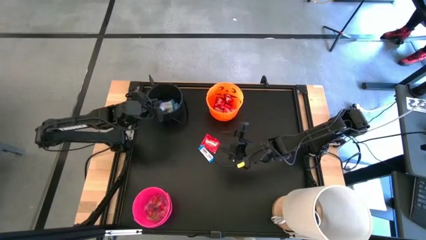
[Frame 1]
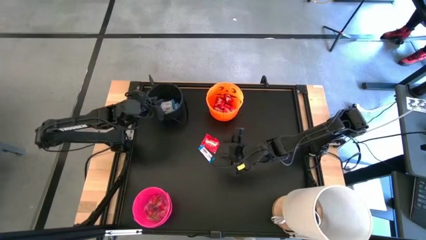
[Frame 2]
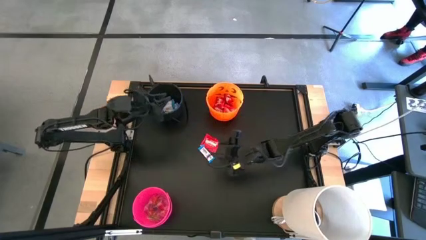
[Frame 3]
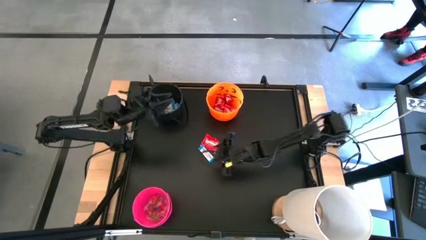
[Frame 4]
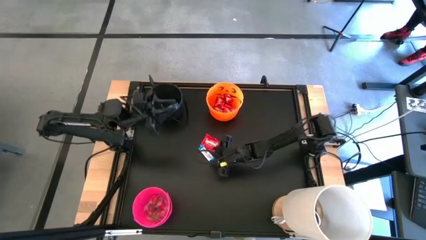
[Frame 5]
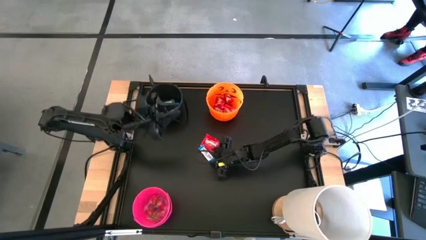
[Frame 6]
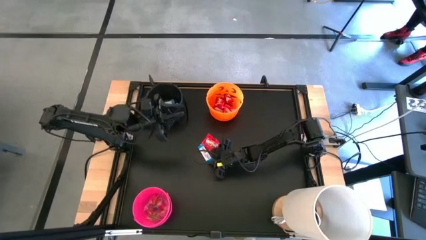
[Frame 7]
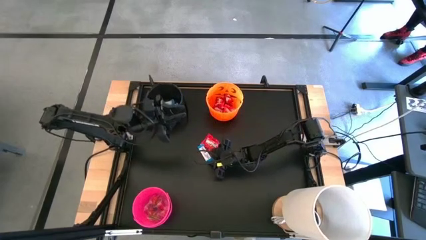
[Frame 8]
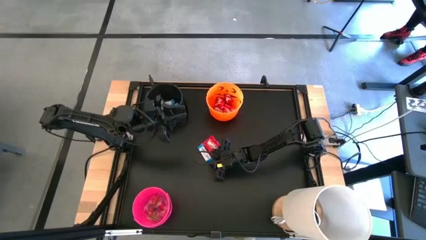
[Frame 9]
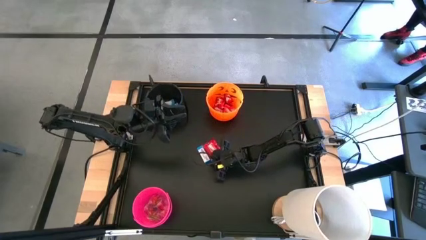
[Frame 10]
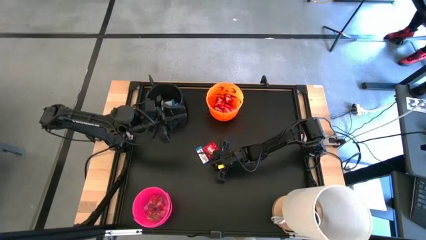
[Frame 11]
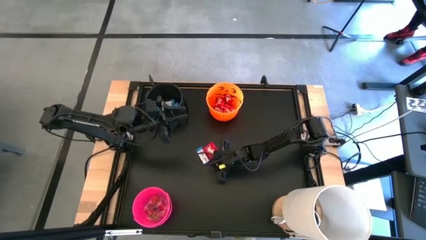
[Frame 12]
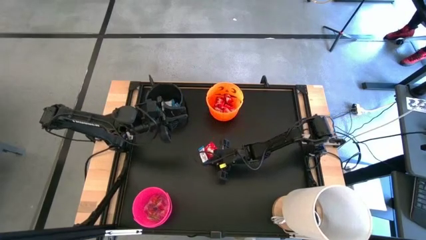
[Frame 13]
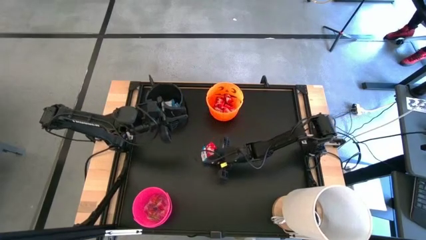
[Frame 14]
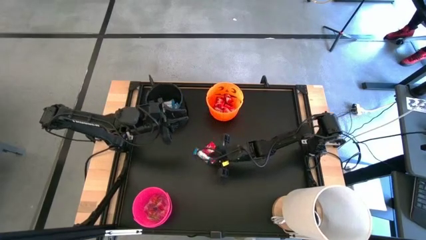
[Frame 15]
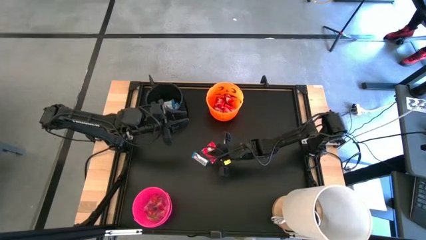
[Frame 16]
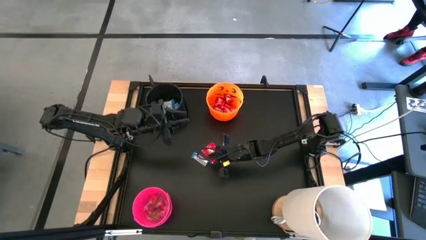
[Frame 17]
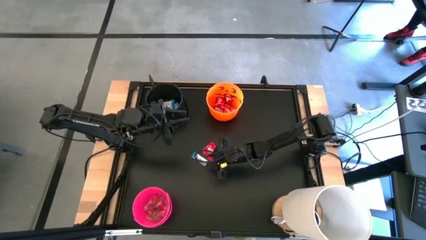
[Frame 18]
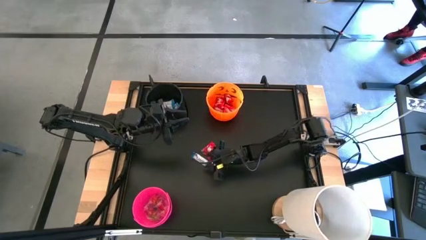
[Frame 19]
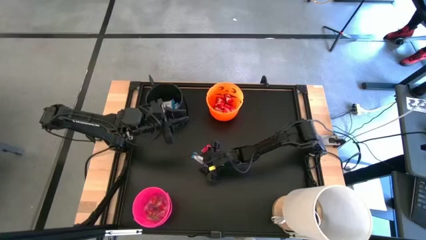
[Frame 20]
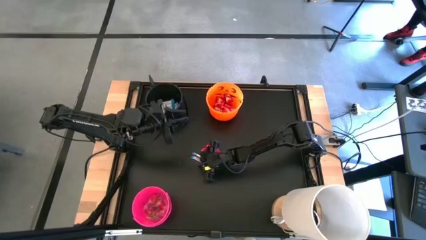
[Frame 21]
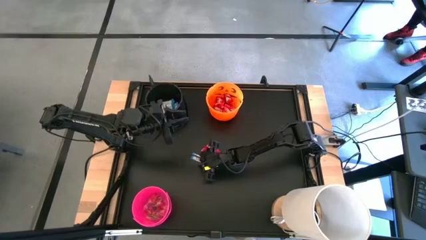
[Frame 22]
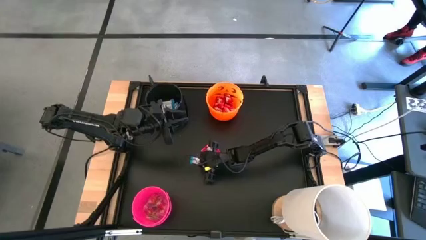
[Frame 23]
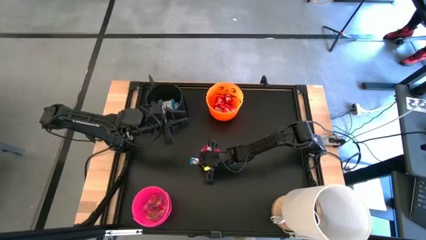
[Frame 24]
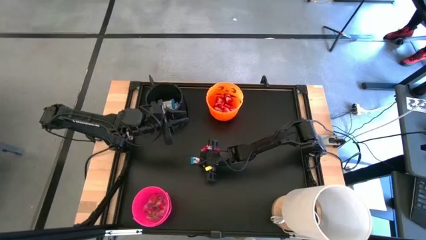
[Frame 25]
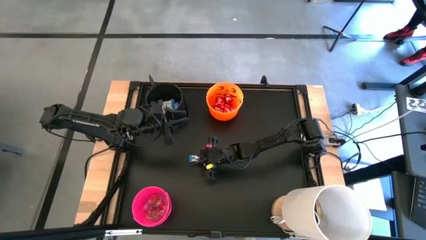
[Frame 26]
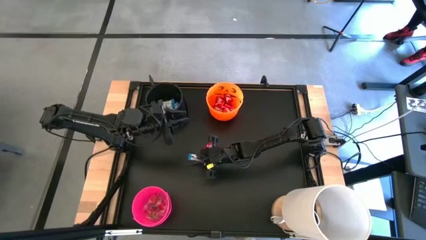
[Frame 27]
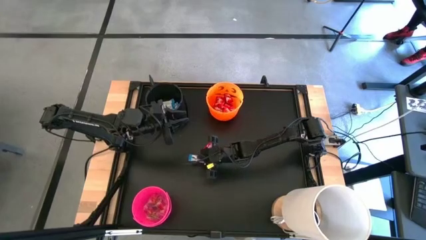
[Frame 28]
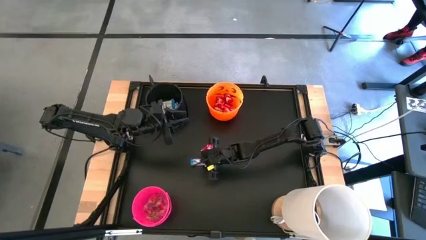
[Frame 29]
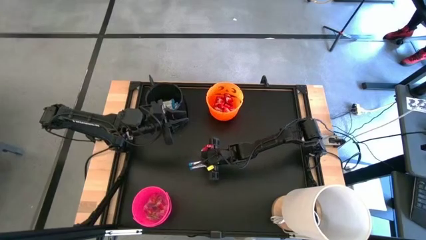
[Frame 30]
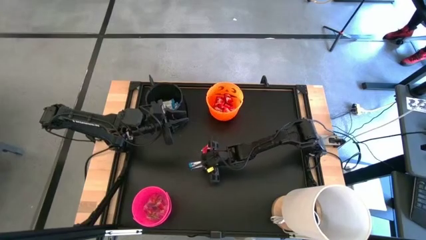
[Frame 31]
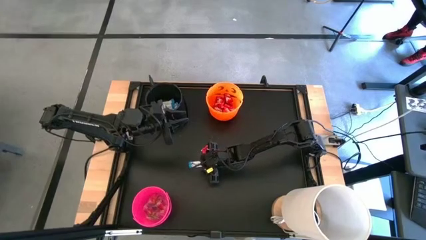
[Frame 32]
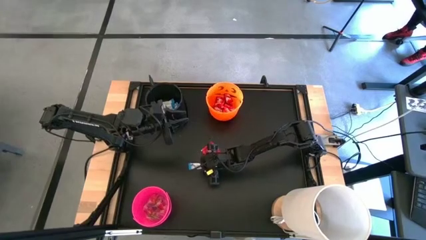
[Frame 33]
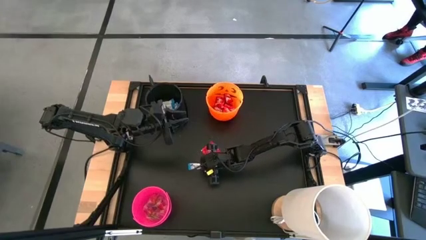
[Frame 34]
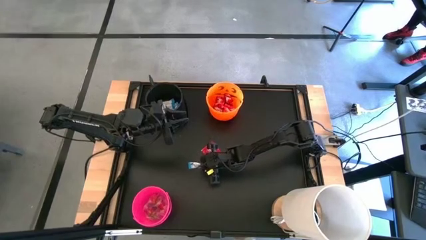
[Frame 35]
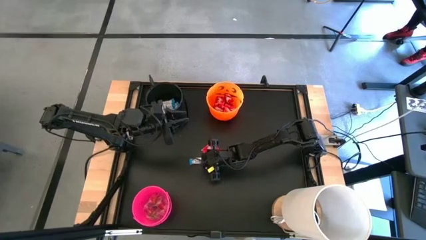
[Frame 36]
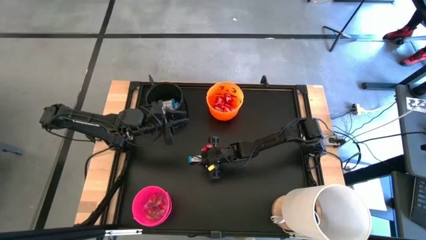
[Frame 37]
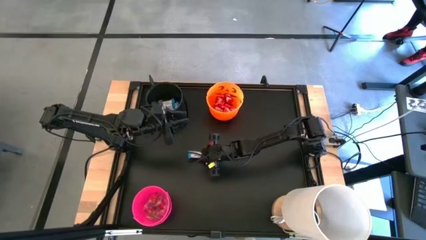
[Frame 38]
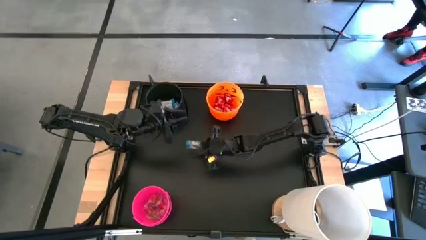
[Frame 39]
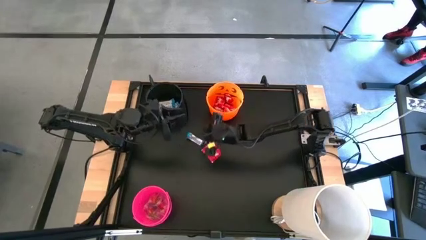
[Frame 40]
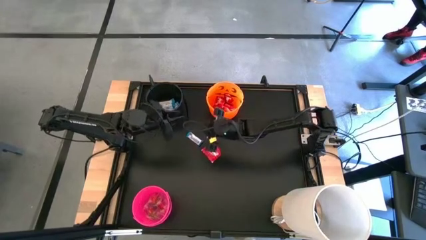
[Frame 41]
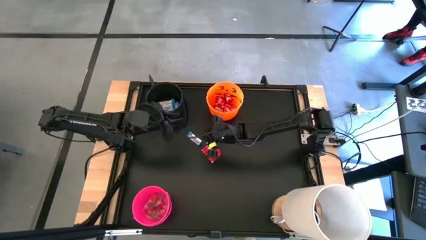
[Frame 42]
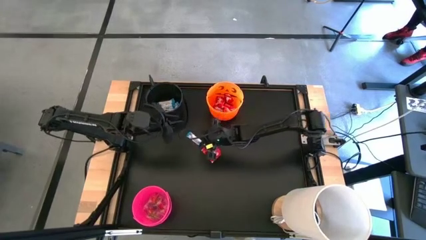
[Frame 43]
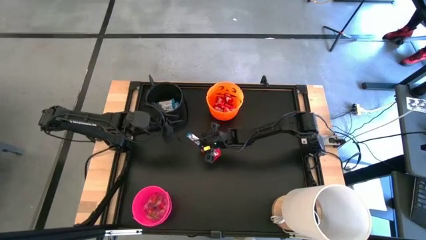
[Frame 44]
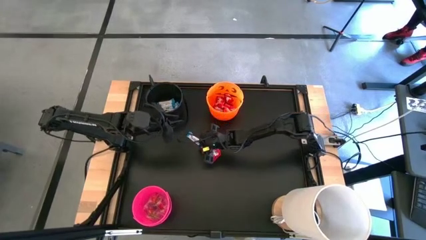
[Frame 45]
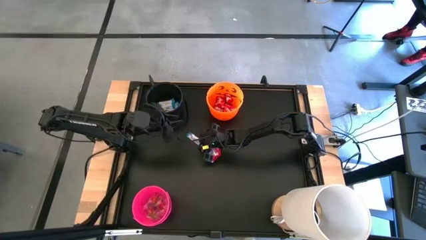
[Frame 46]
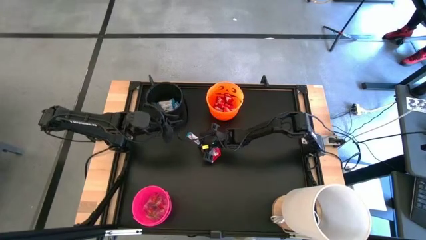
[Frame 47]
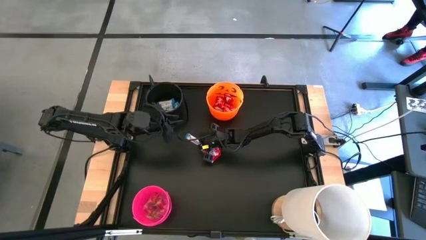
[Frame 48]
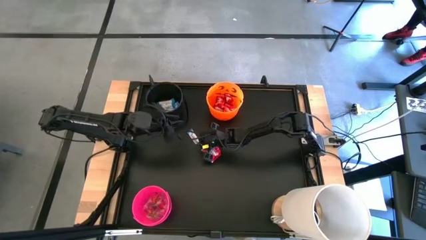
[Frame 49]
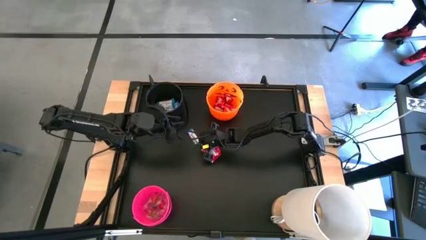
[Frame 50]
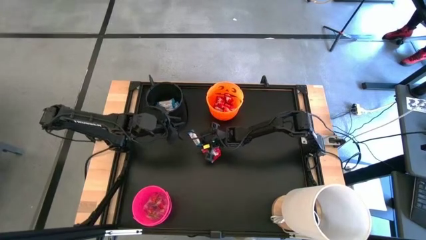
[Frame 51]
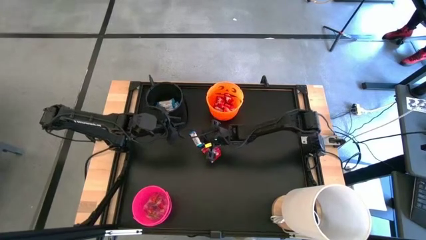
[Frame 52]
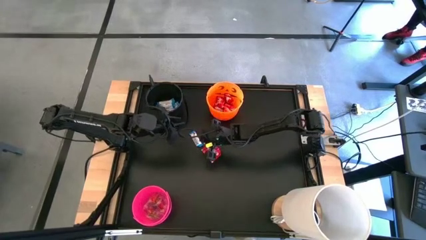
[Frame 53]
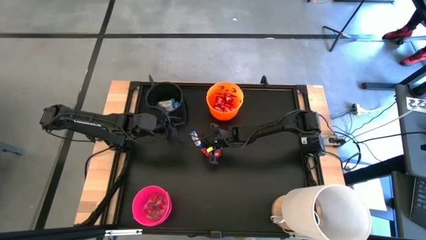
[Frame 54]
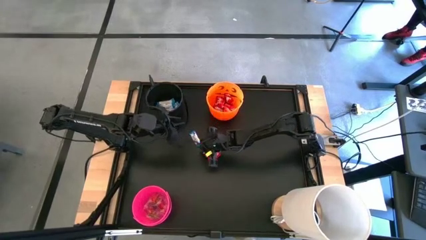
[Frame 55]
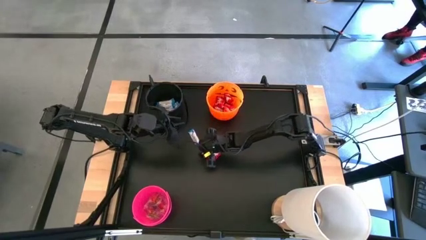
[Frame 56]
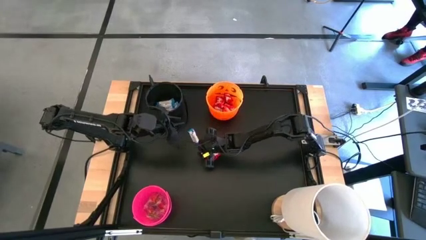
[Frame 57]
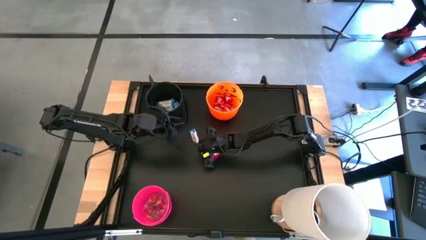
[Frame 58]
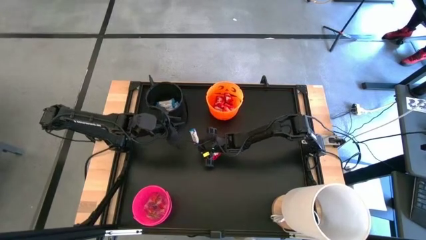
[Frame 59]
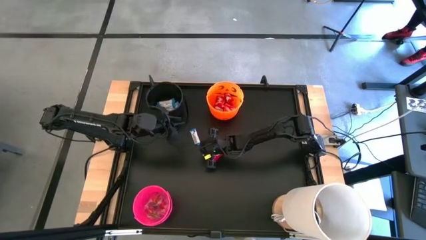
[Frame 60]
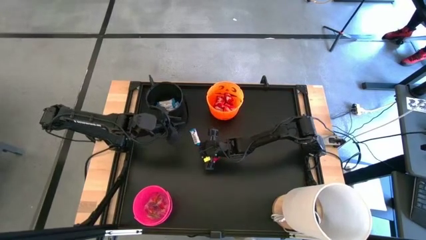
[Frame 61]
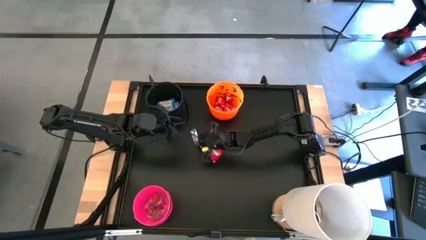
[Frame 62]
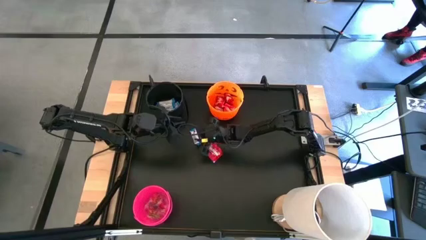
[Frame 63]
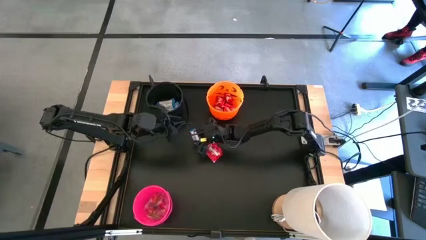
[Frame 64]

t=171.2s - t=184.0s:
Task: Sort candy
Put the white candy into the black bin

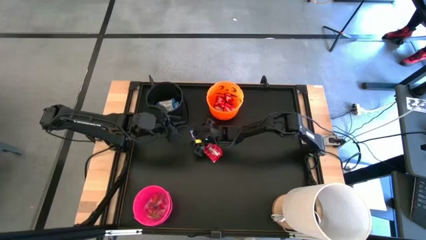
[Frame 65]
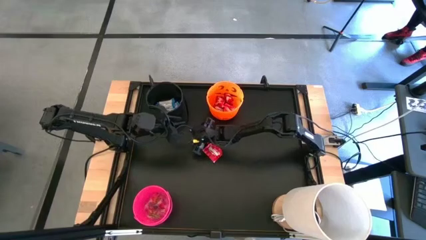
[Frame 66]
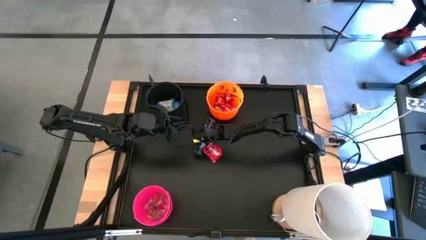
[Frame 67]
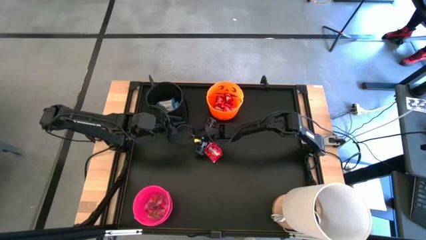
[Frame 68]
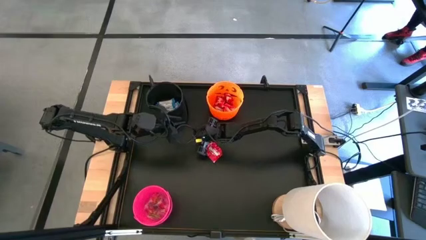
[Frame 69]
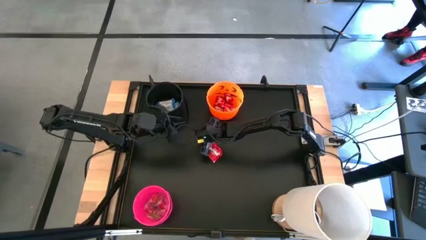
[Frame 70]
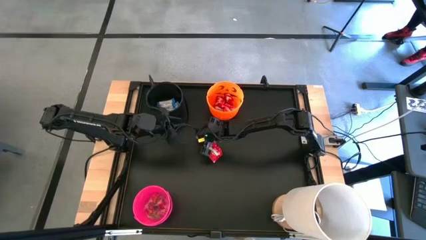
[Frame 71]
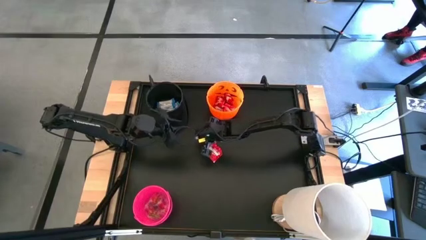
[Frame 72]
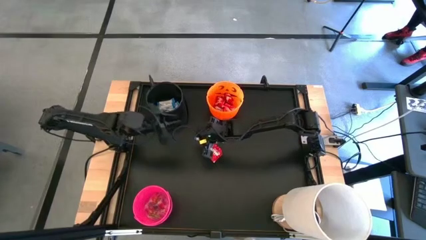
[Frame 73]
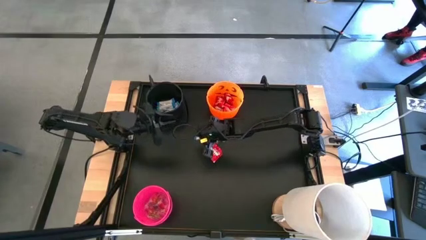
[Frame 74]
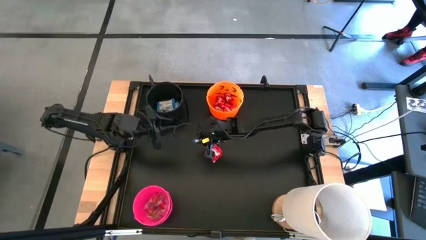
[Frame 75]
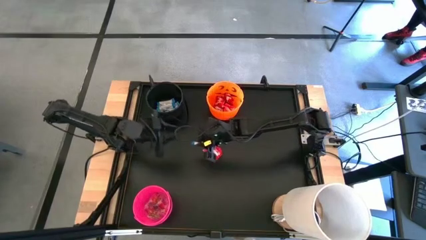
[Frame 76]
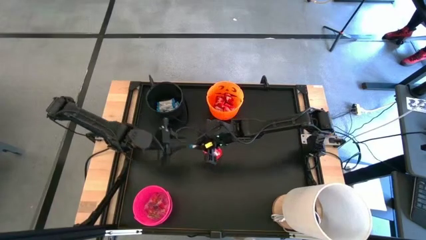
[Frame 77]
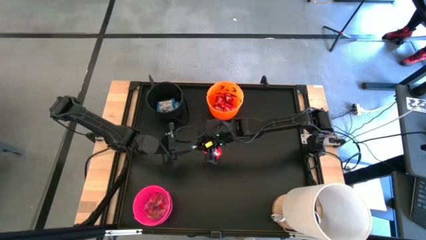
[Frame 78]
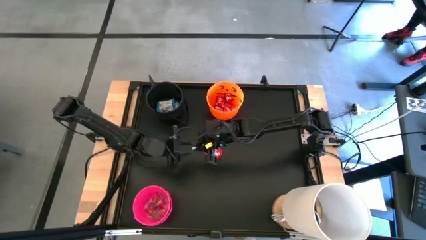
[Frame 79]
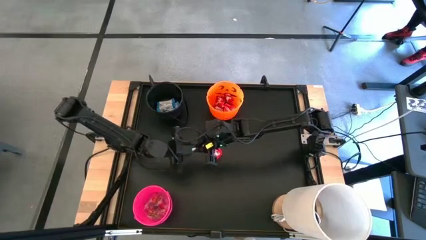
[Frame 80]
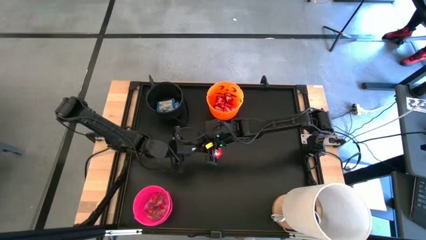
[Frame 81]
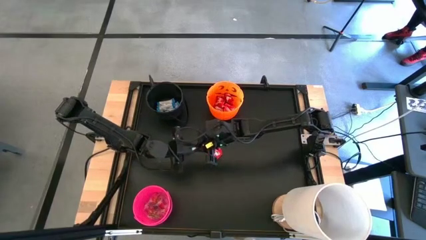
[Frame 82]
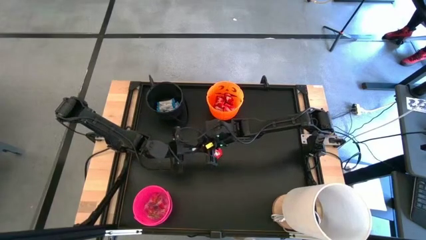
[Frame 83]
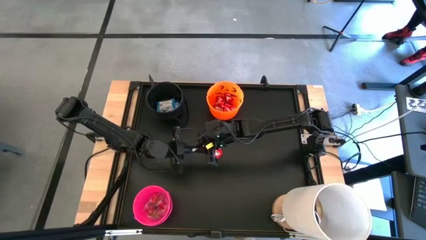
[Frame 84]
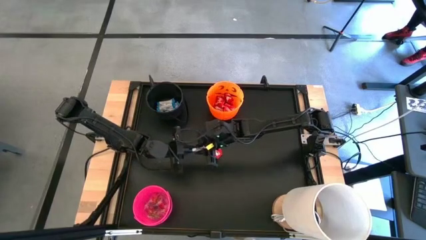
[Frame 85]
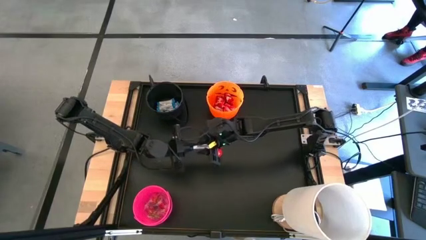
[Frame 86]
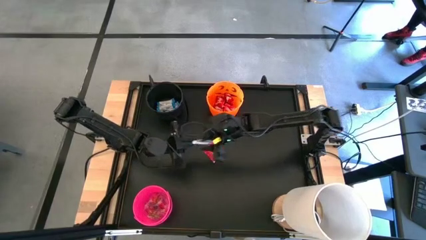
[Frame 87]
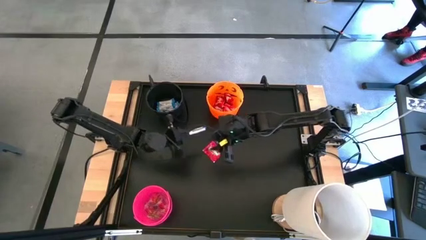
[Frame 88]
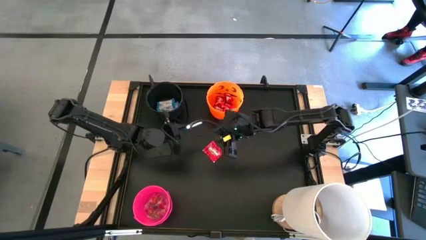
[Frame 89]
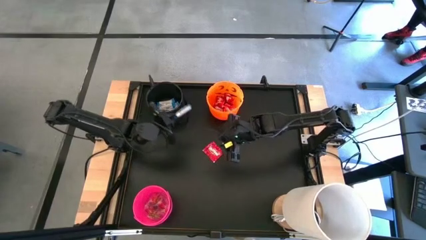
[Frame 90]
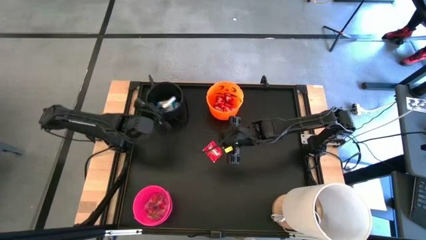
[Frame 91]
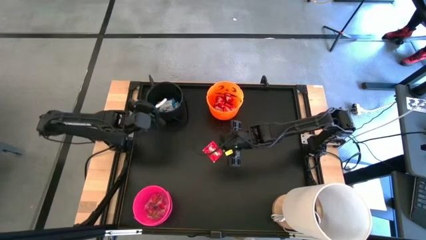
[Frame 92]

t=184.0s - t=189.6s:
Put the white candy into the black bin
